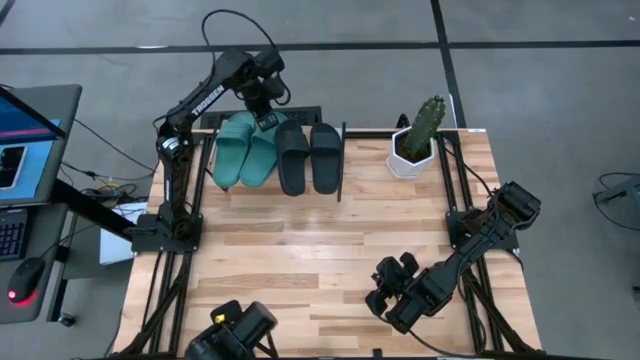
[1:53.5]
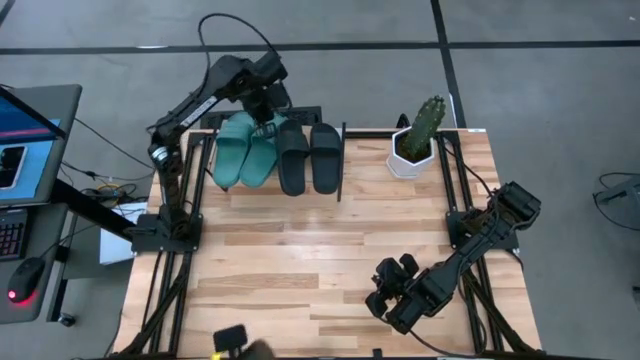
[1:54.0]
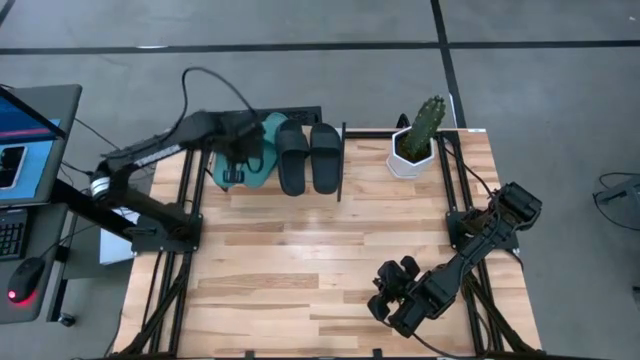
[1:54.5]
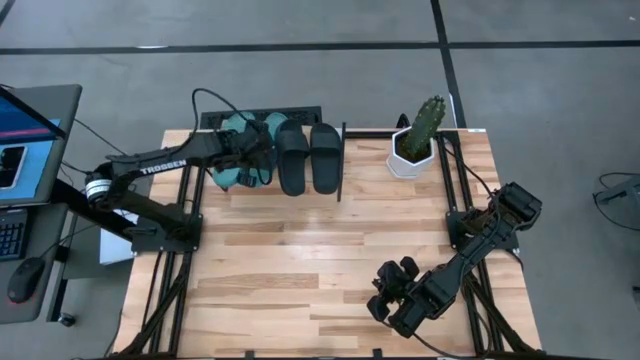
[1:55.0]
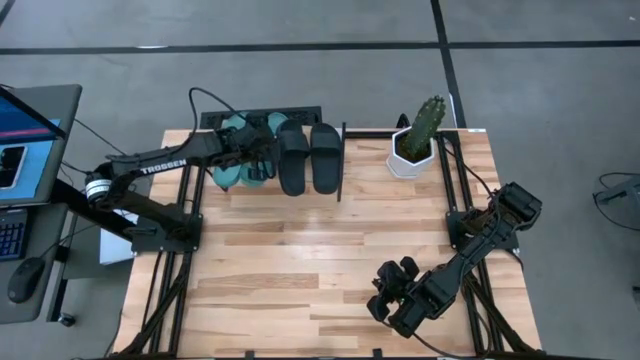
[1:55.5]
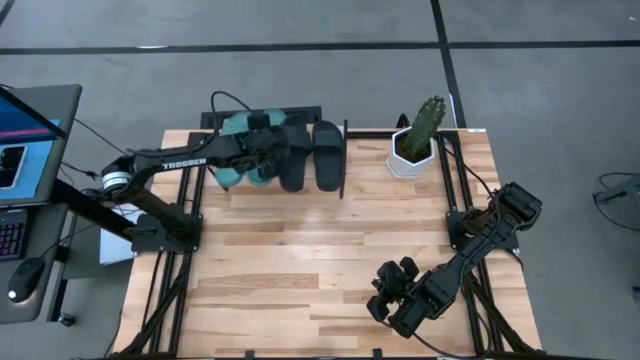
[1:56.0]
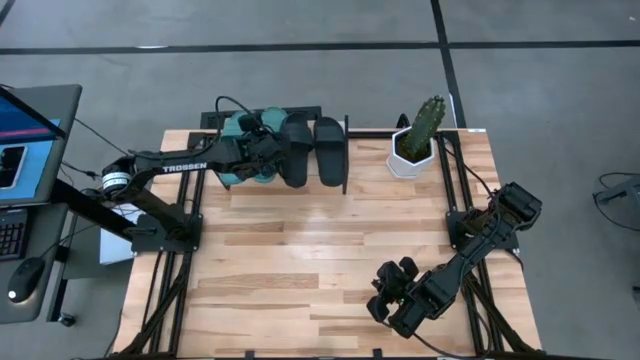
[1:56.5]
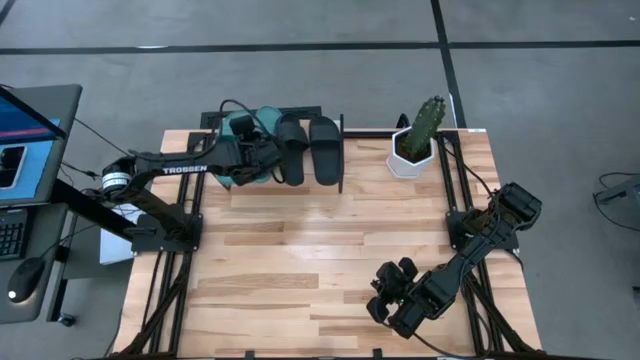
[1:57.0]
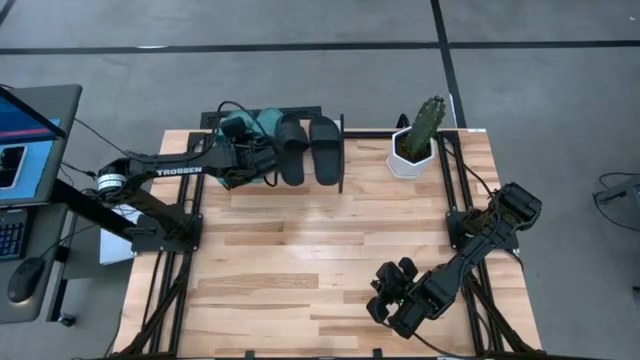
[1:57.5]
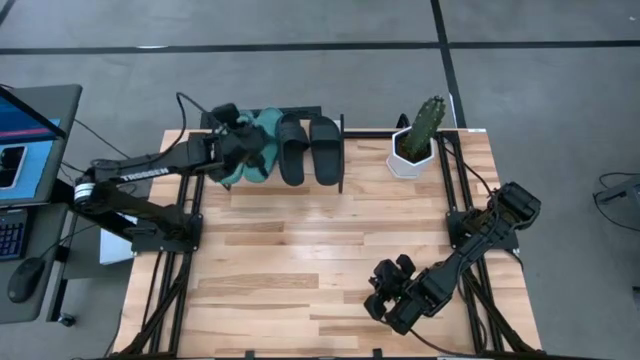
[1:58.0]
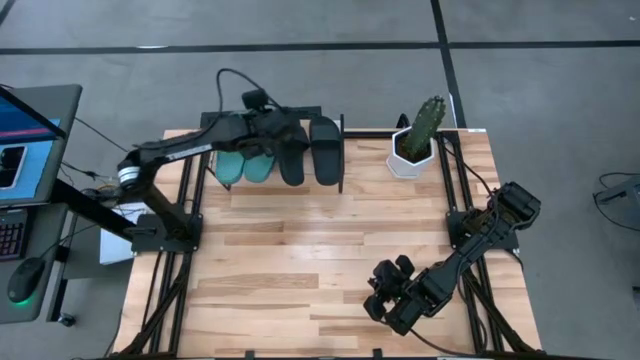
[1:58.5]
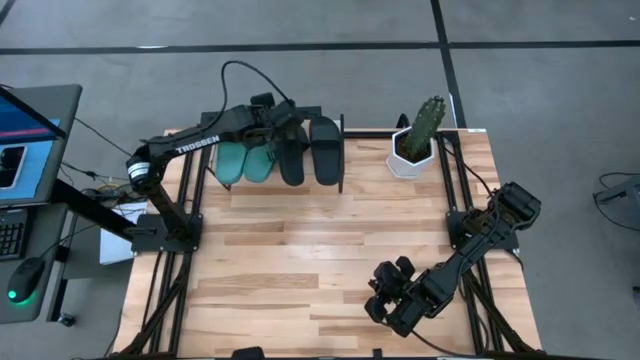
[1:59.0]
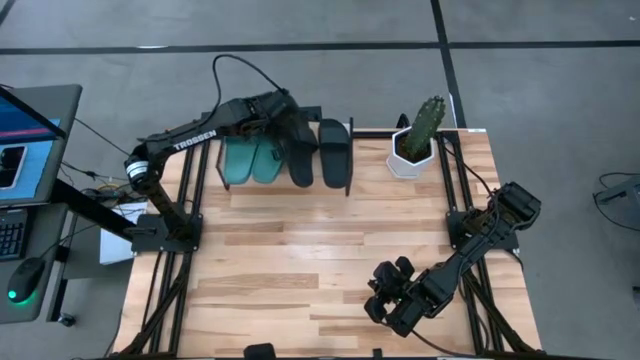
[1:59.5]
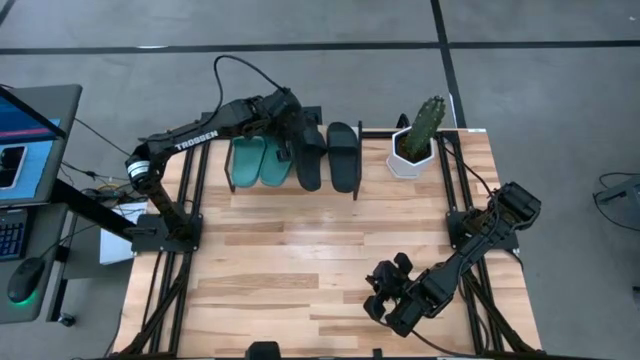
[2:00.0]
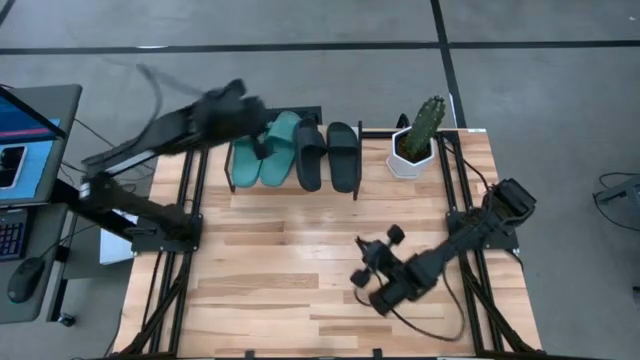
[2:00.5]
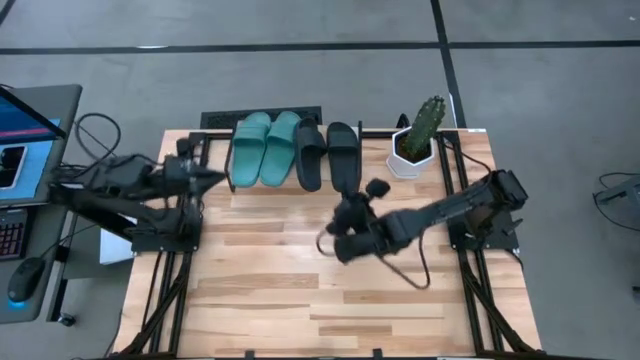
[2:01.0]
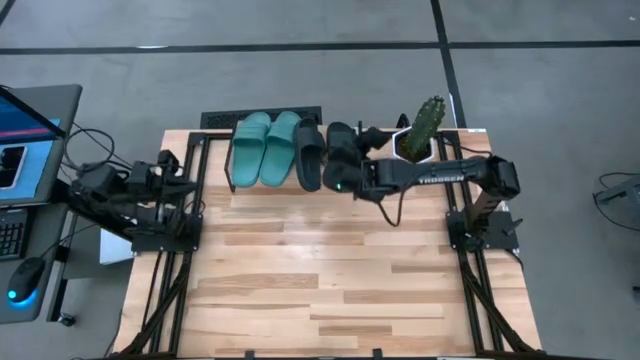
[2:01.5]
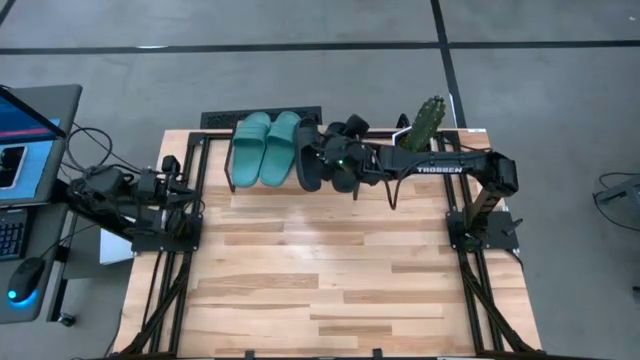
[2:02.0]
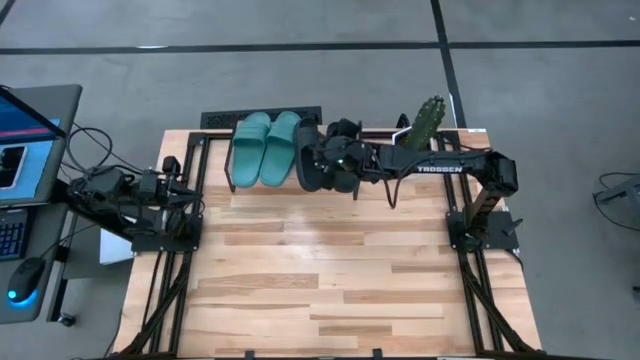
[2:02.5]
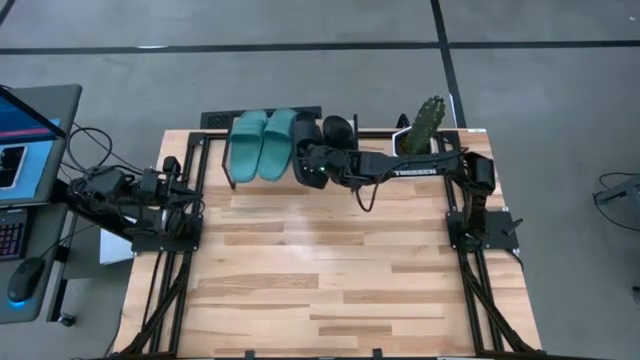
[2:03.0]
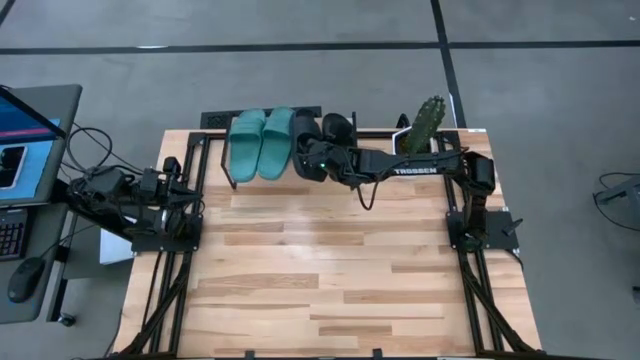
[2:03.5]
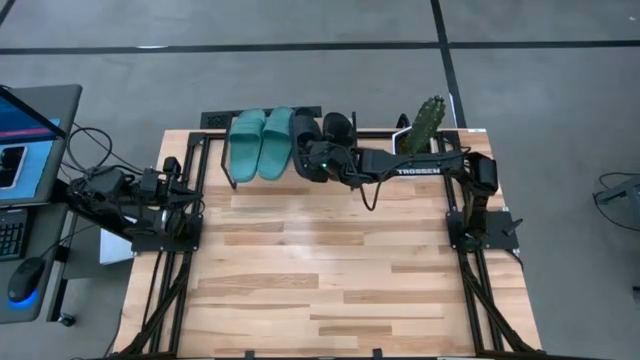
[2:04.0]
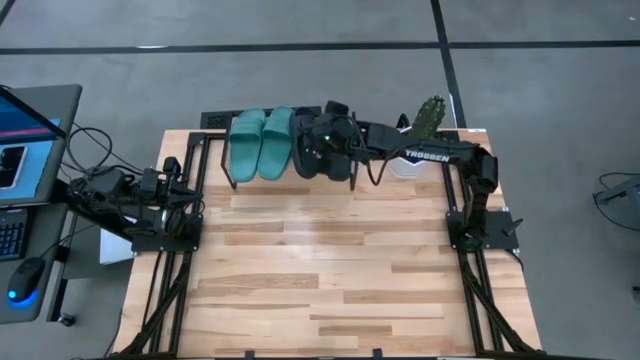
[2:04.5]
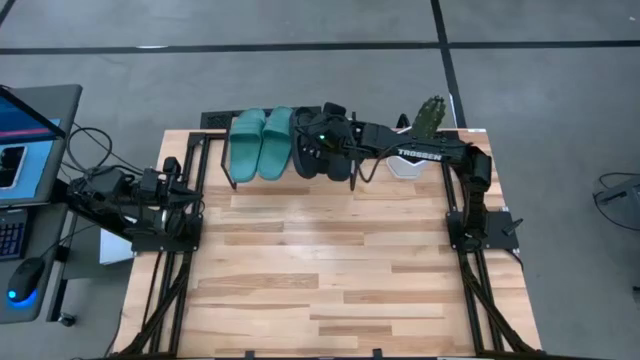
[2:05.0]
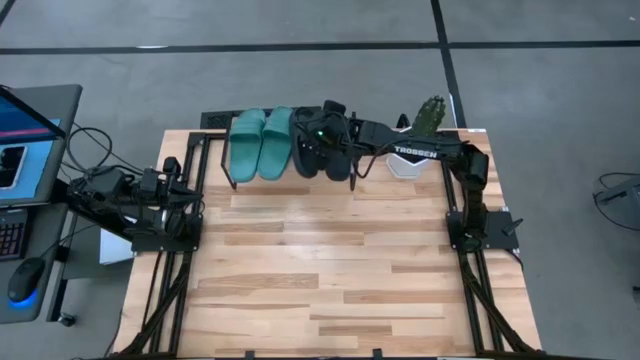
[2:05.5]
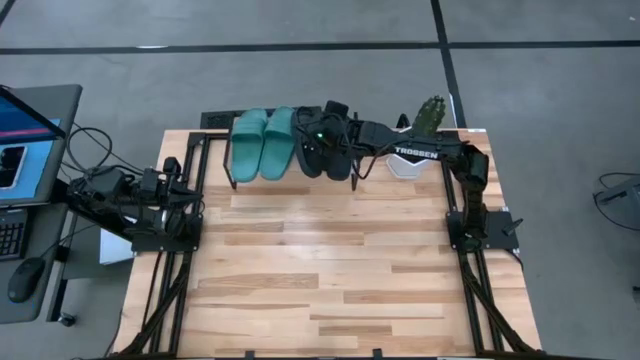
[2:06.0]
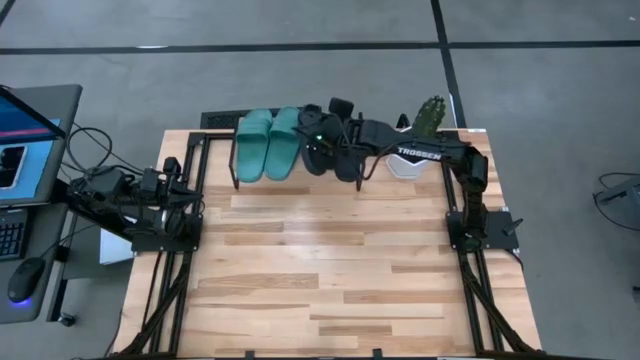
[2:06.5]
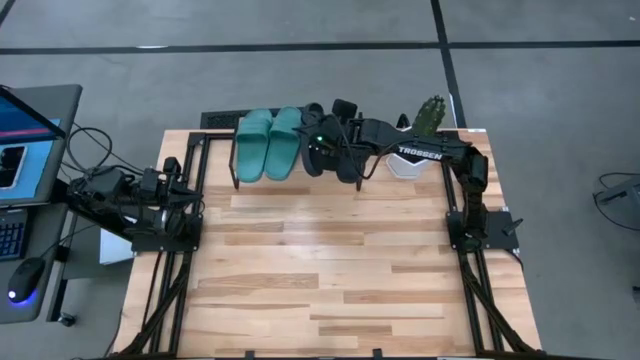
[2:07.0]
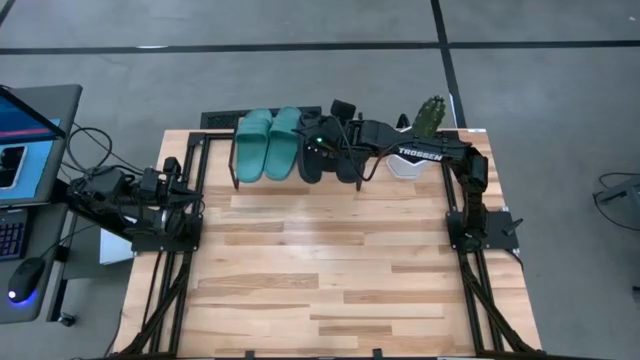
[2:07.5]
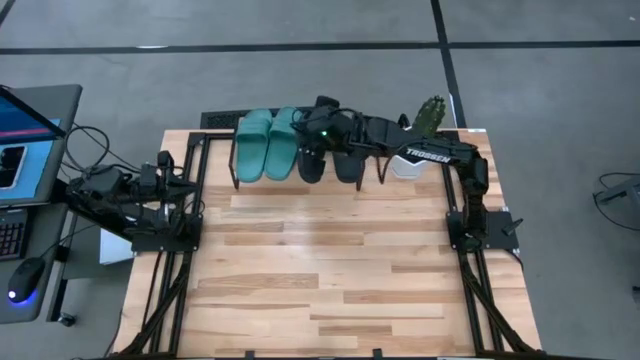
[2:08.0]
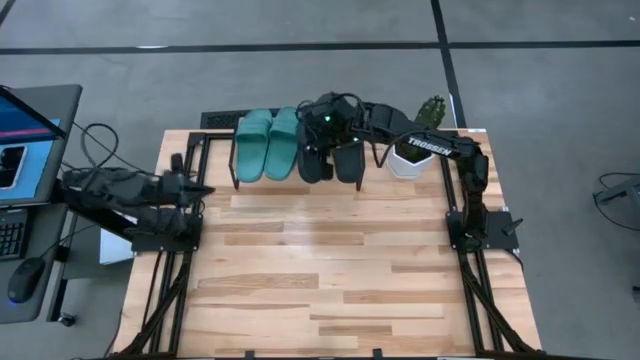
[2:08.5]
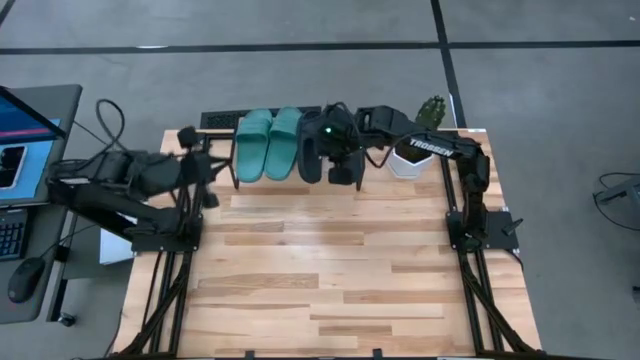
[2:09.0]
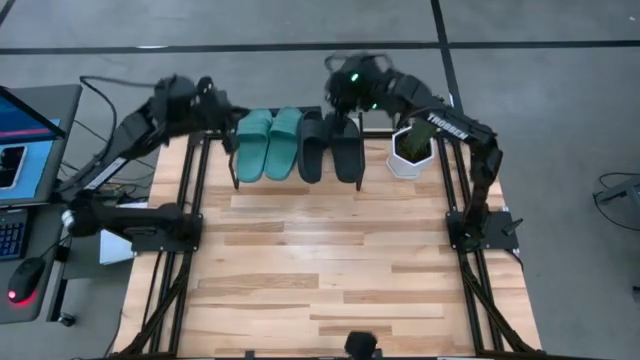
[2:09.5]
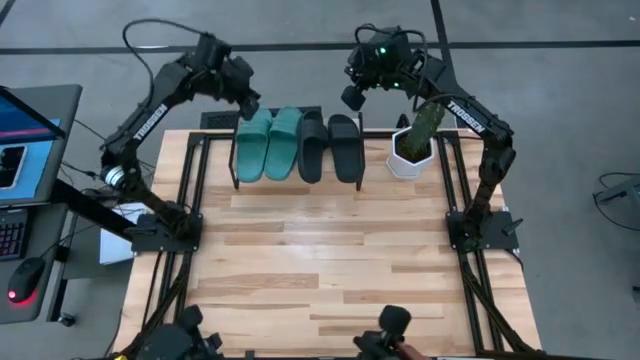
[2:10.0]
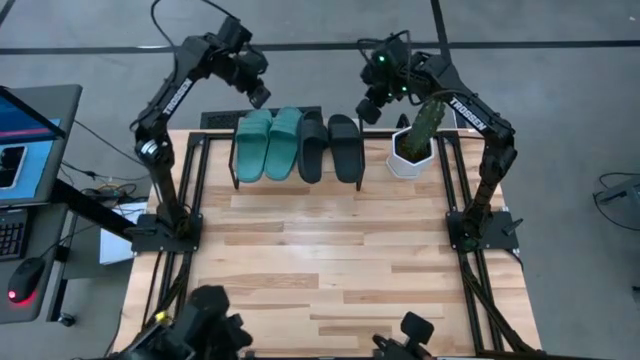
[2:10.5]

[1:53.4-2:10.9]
Task: Pick and place slides into the shelf
Adjust the slides on the shelf

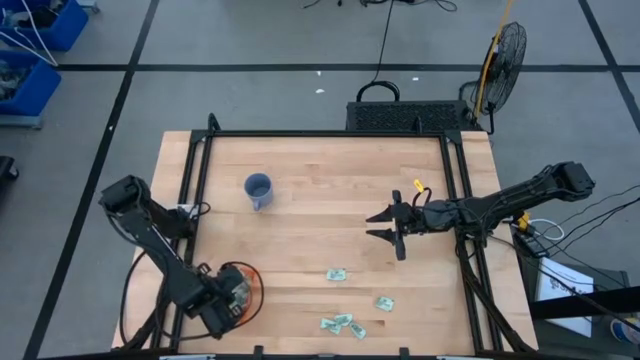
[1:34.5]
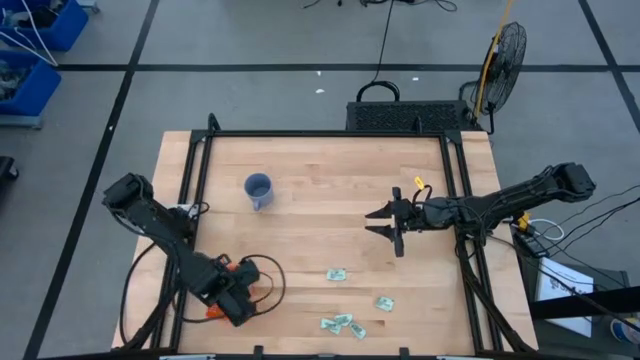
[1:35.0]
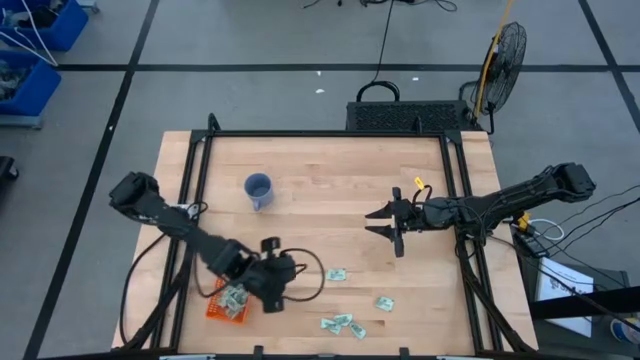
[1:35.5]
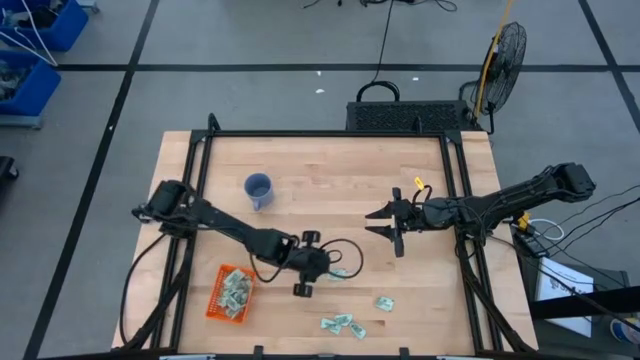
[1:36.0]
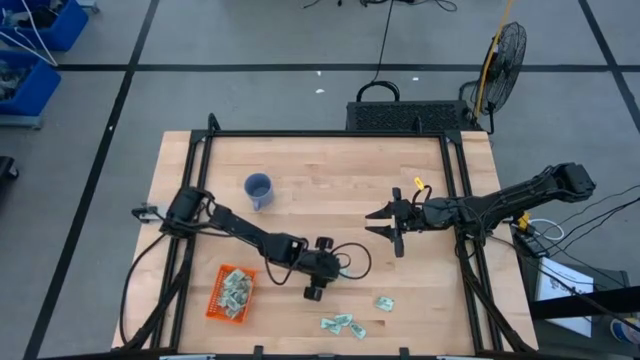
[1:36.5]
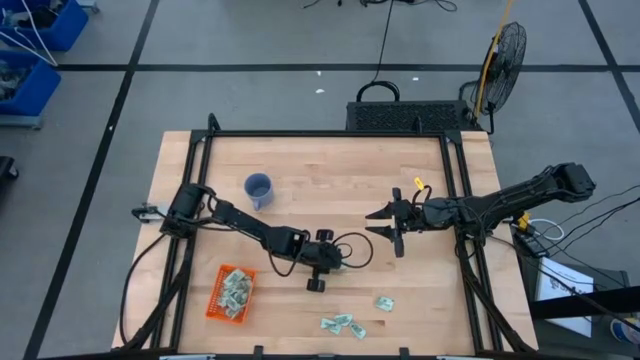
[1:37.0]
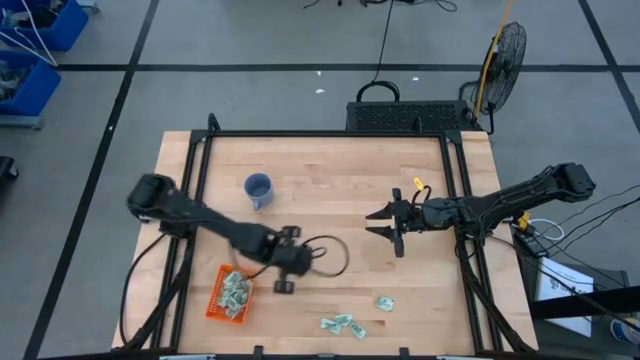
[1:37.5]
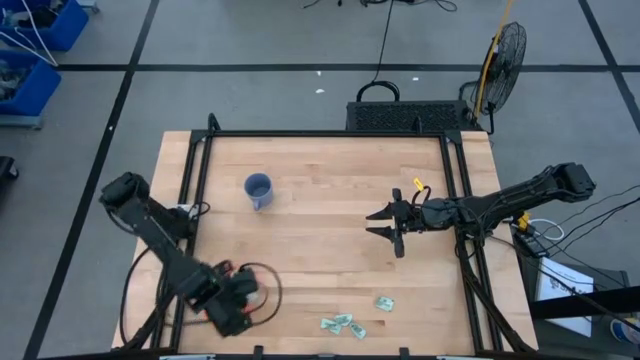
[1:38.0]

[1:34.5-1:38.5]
Task: Pick and place Stevia / Truvia into bins
Put the stevia packet into the orange bin
